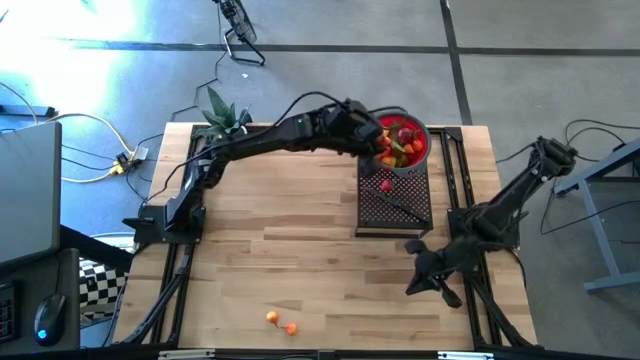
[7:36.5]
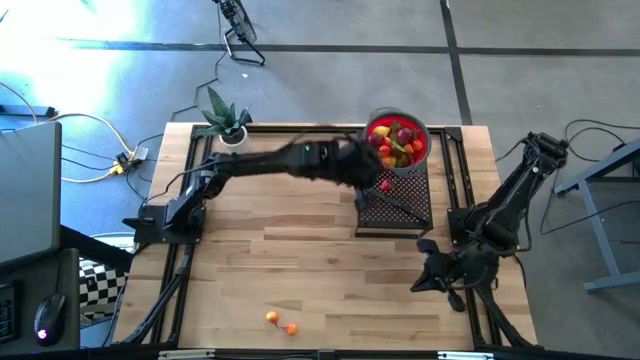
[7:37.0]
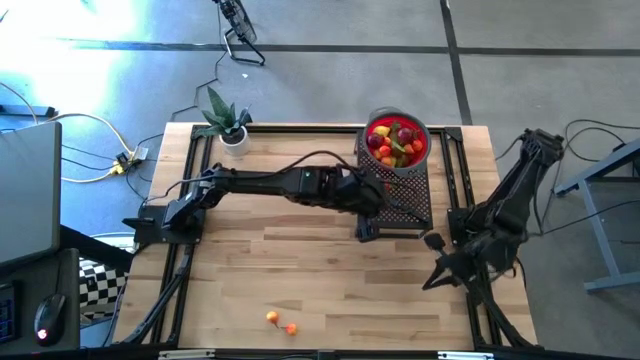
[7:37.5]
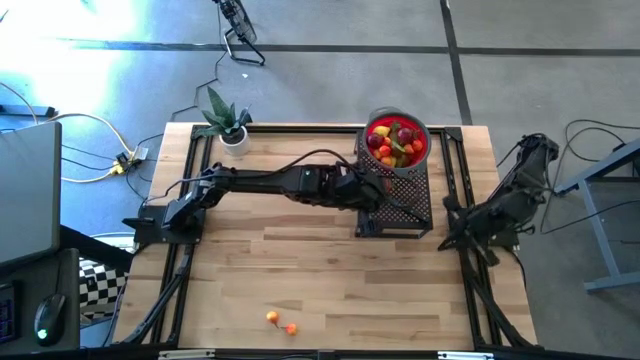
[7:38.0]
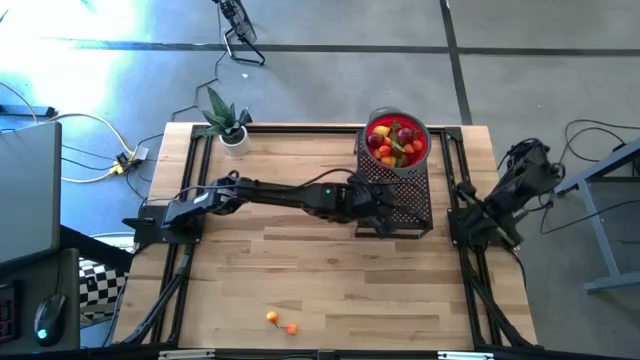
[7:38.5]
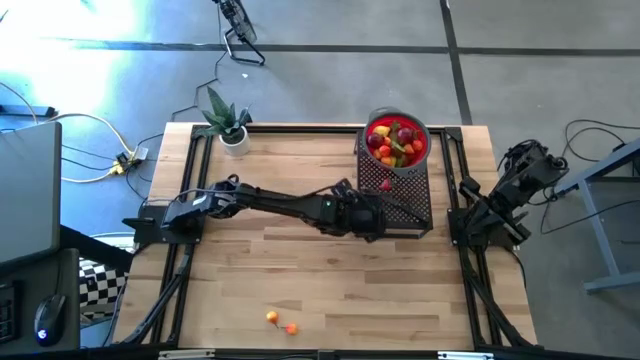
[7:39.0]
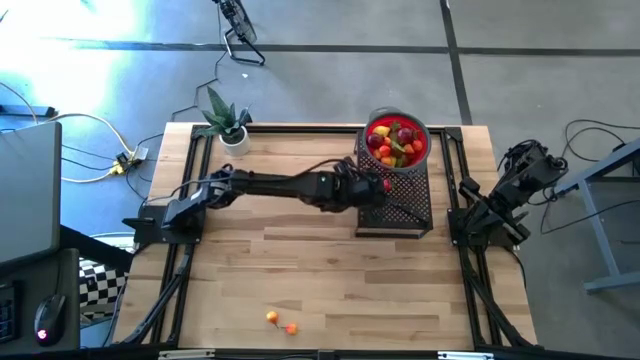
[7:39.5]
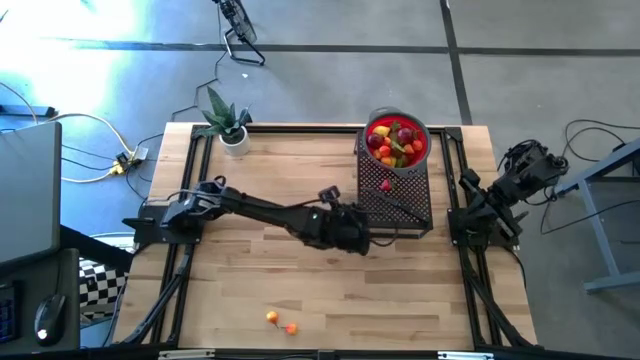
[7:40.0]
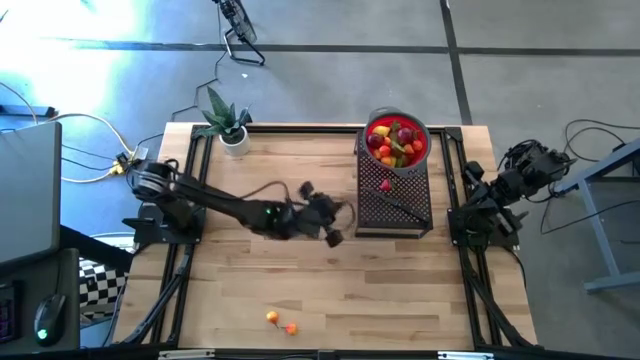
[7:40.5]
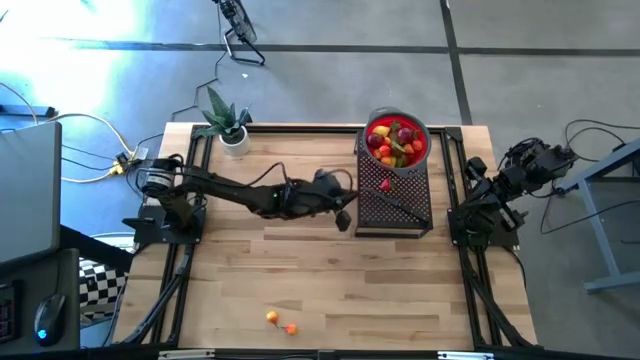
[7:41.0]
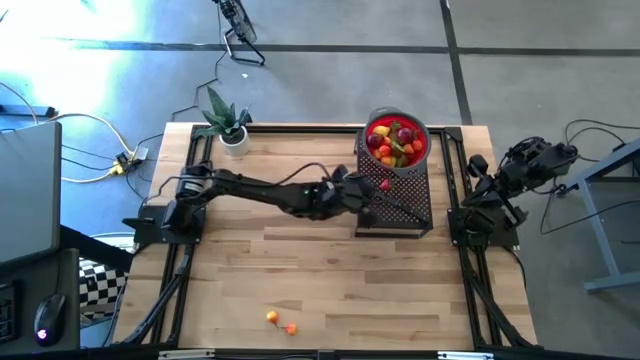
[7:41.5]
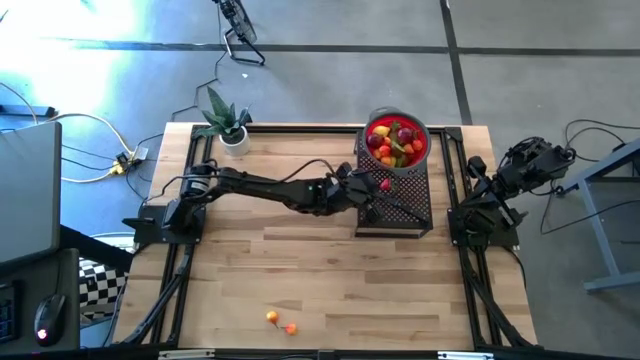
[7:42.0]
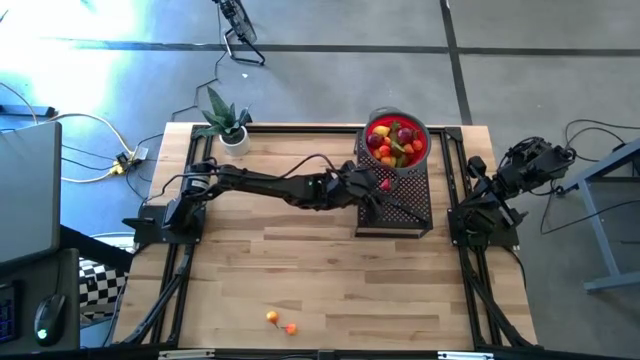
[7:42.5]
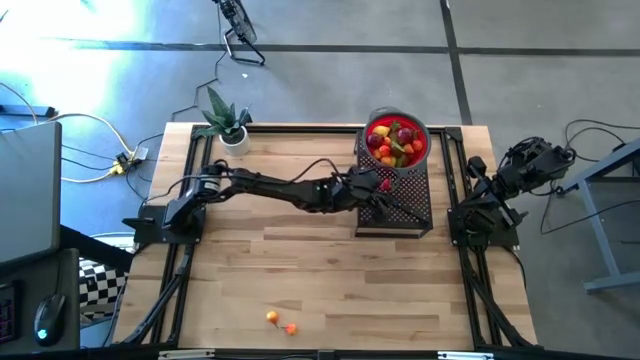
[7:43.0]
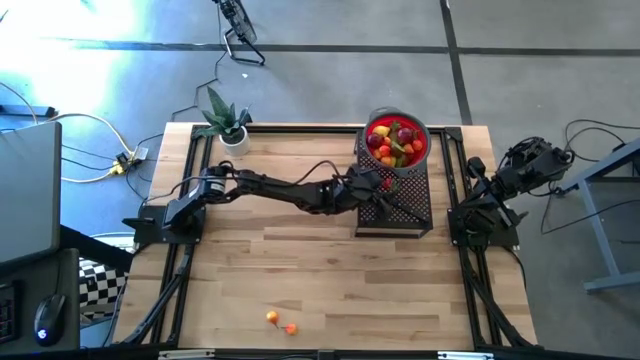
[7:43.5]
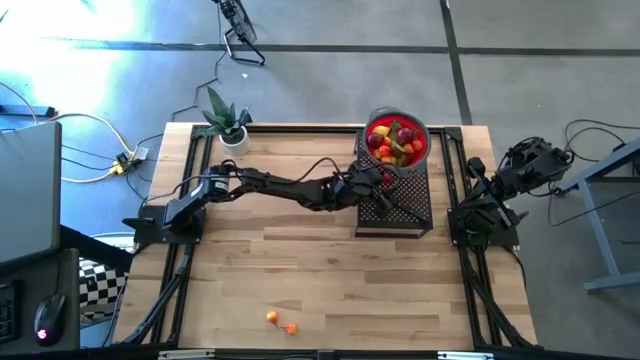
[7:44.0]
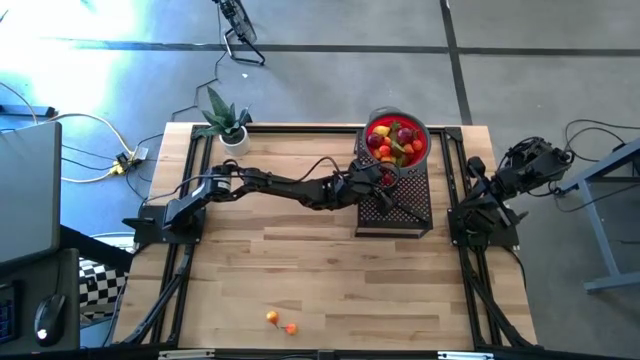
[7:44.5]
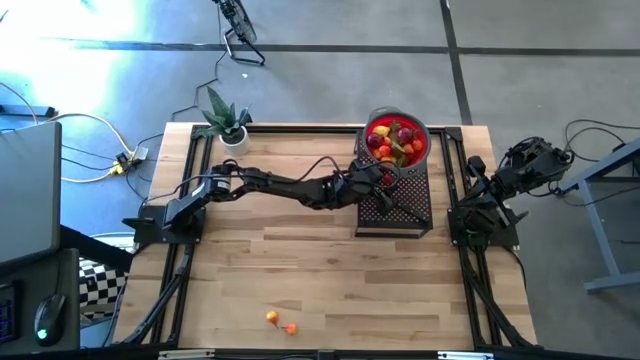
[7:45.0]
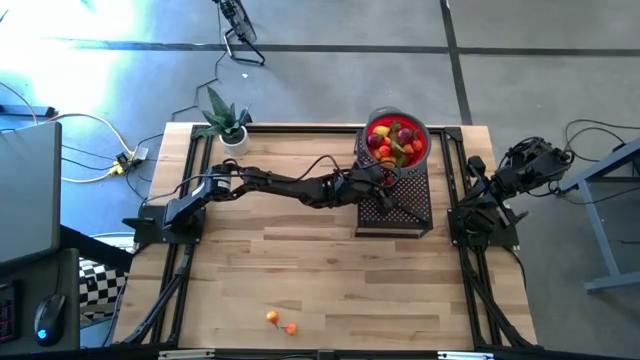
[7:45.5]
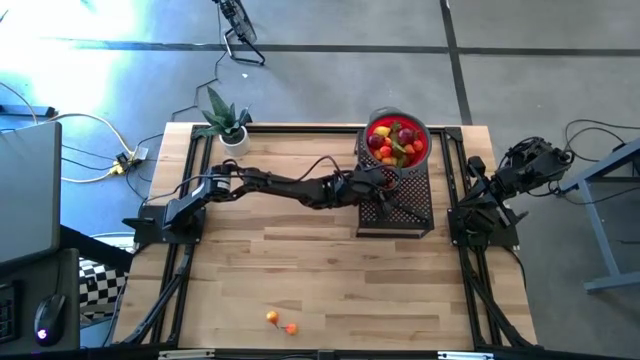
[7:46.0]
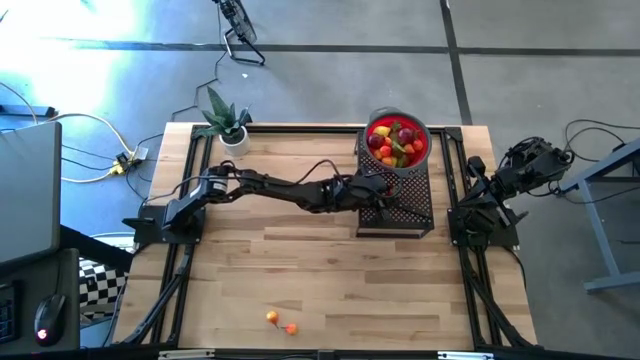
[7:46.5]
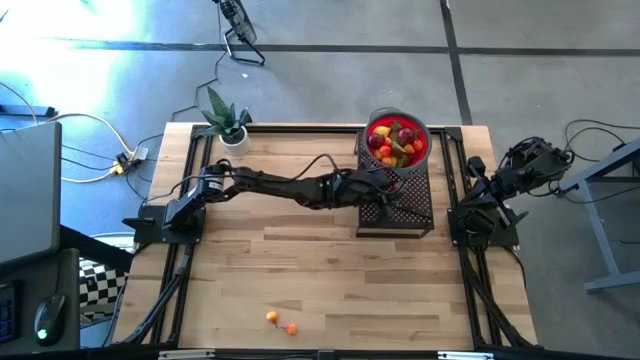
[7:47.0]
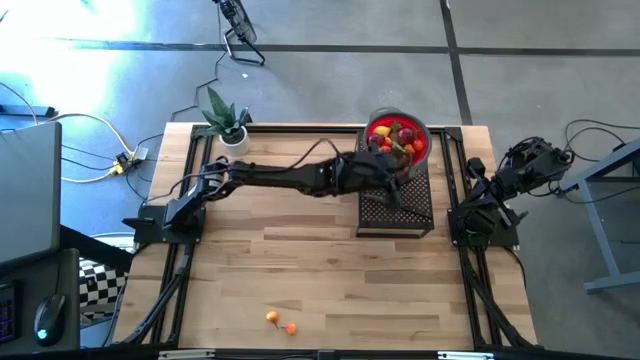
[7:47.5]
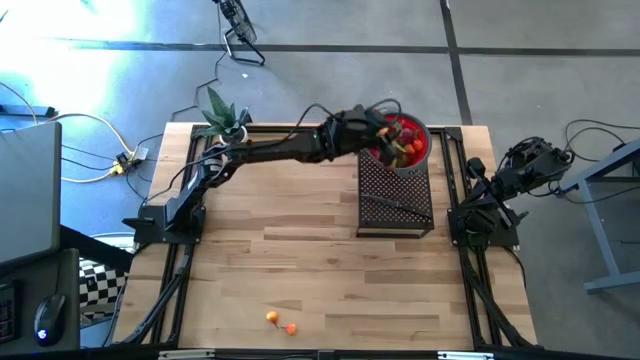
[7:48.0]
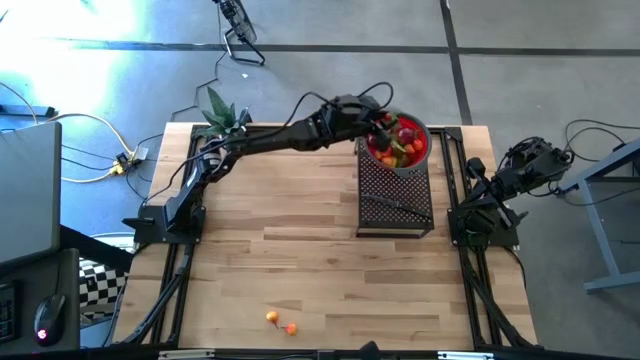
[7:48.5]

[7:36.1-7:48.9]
Task: Pick & Place Fruit
Put the strawberry into the strainer bowl on the shelf

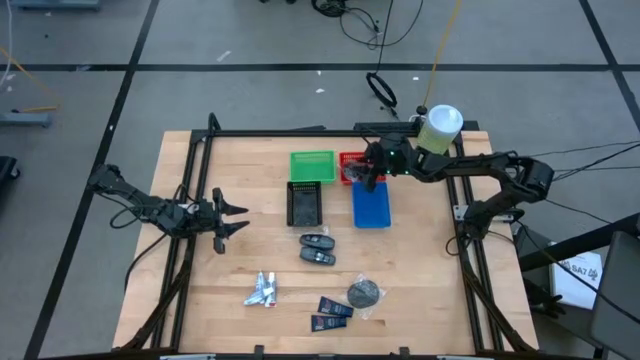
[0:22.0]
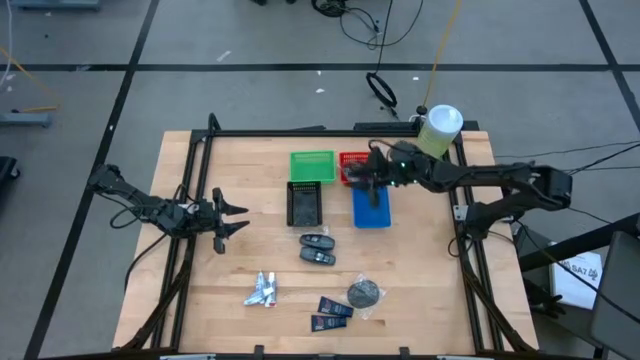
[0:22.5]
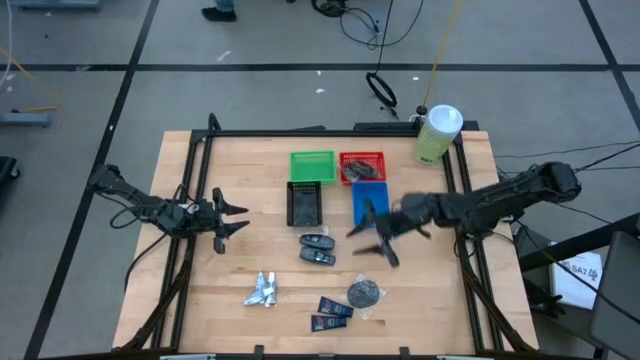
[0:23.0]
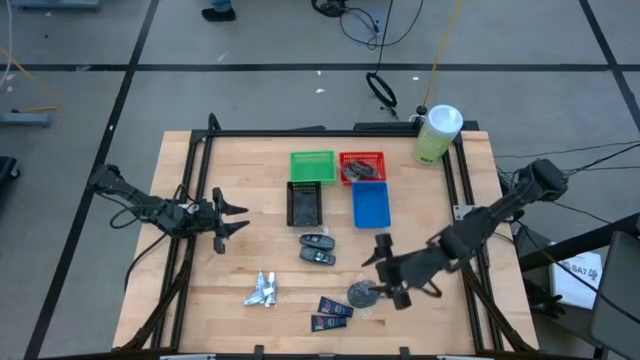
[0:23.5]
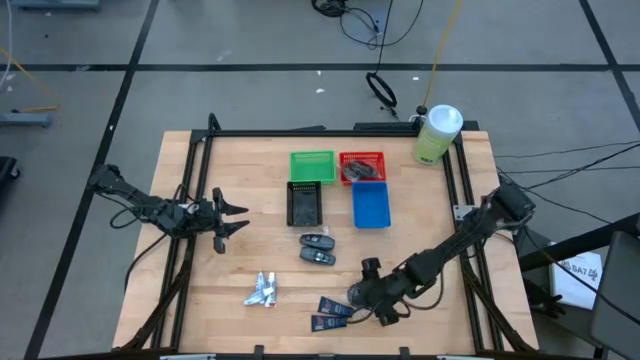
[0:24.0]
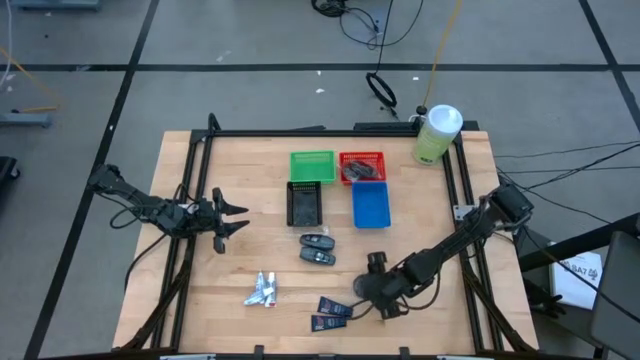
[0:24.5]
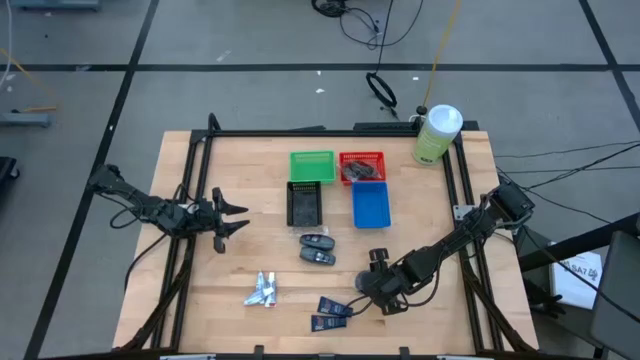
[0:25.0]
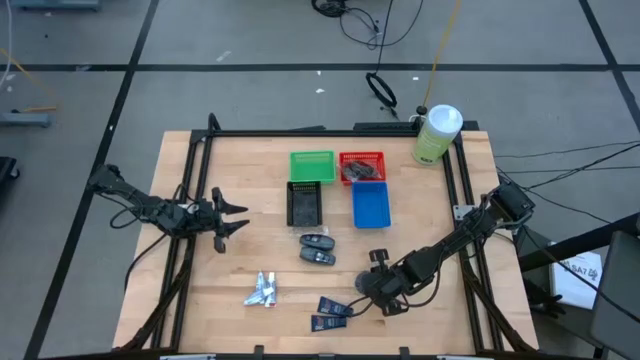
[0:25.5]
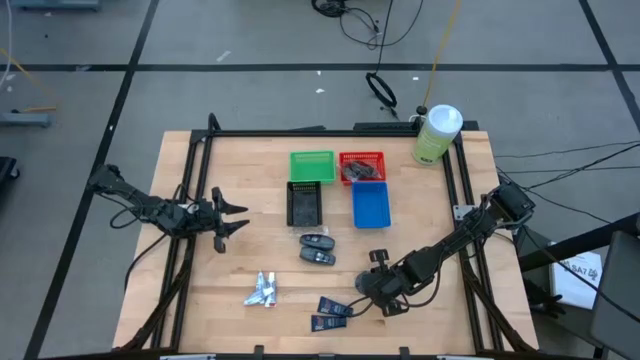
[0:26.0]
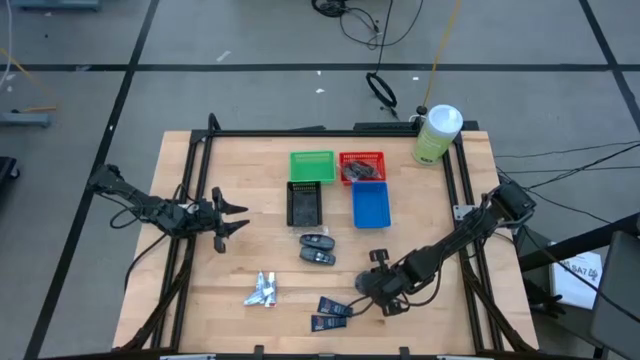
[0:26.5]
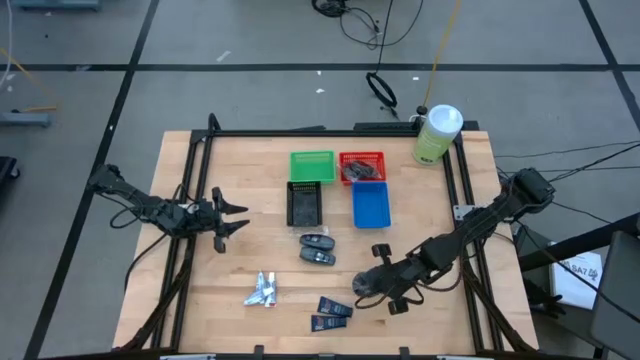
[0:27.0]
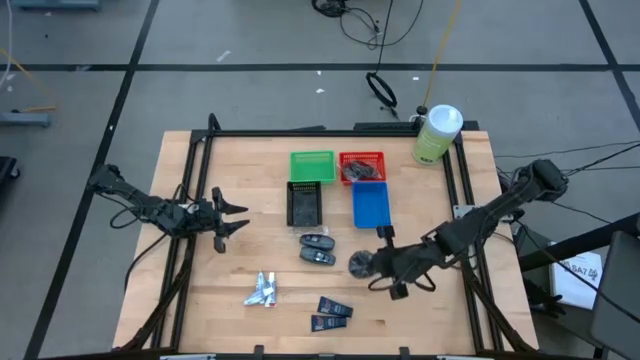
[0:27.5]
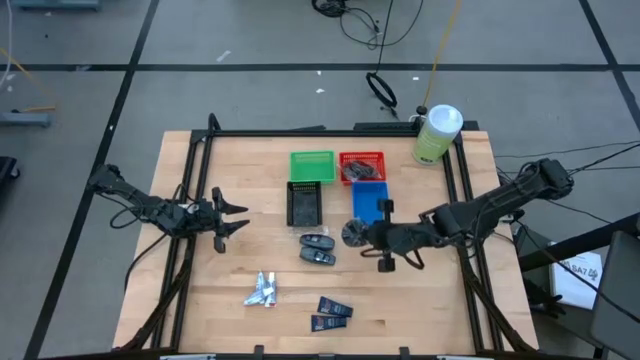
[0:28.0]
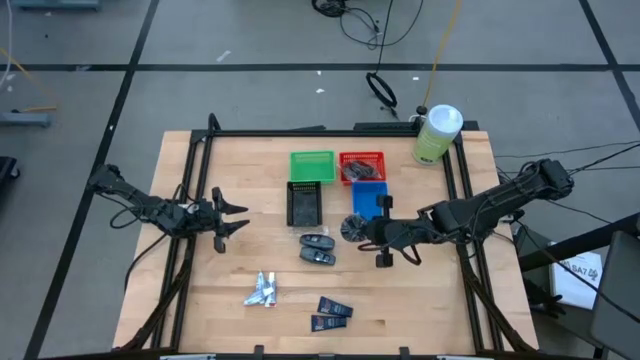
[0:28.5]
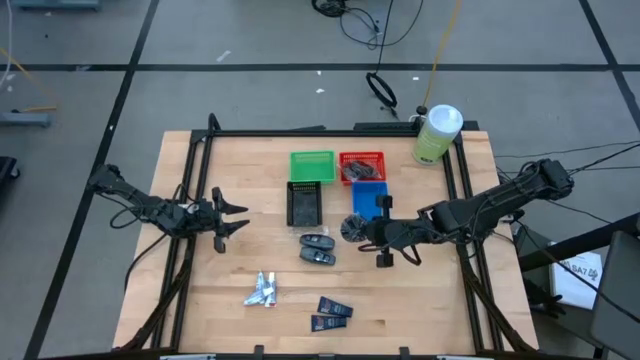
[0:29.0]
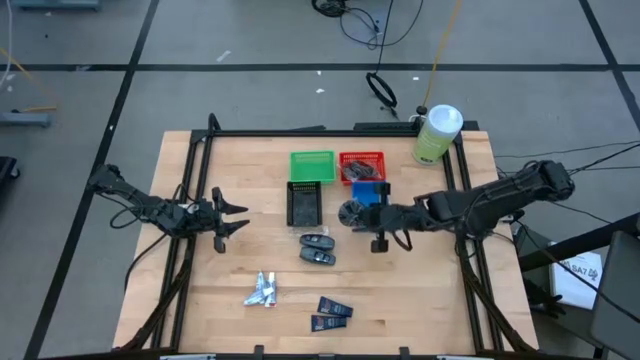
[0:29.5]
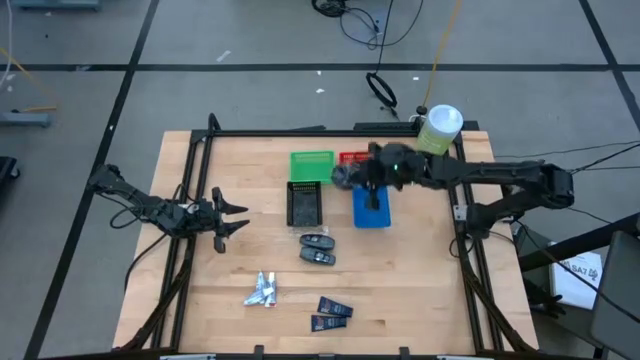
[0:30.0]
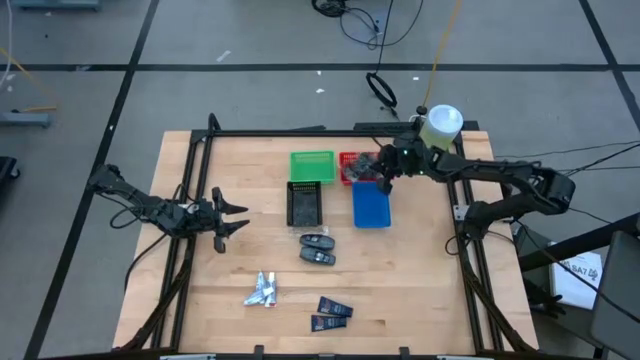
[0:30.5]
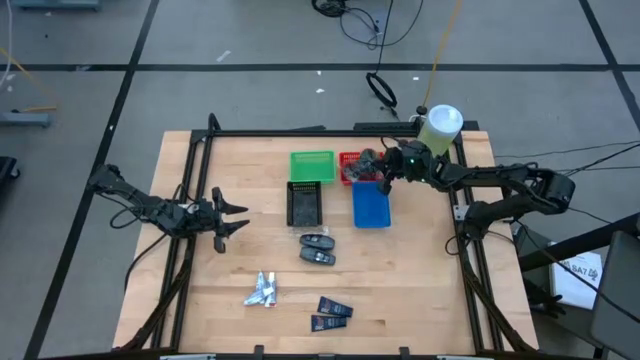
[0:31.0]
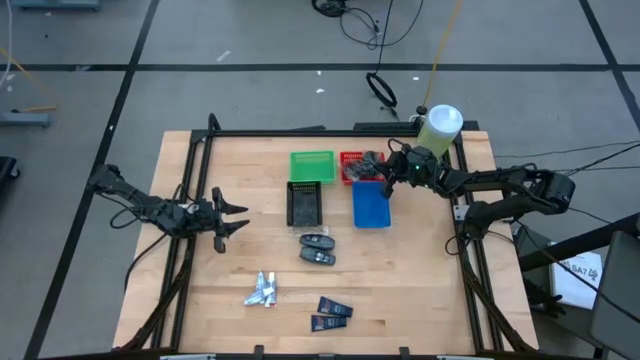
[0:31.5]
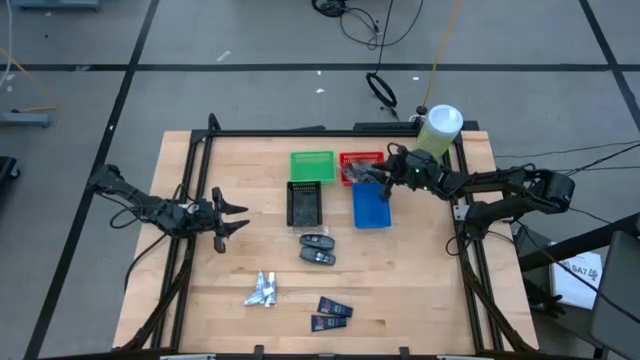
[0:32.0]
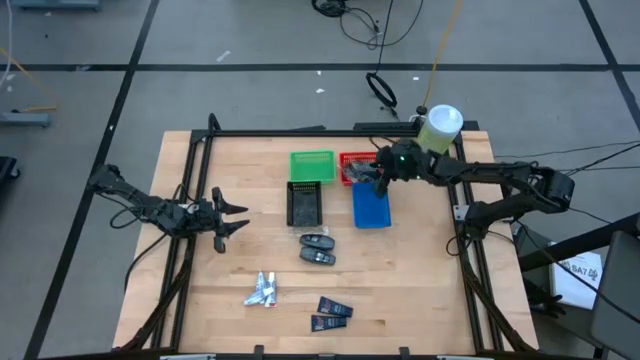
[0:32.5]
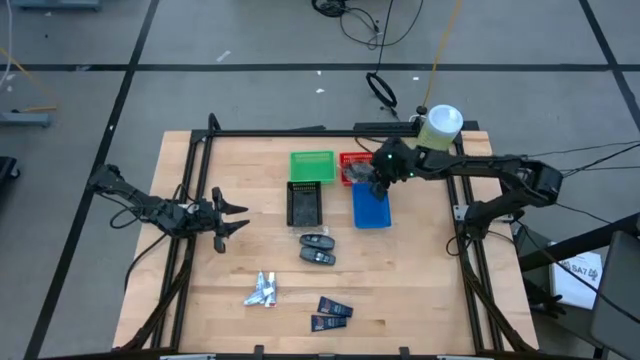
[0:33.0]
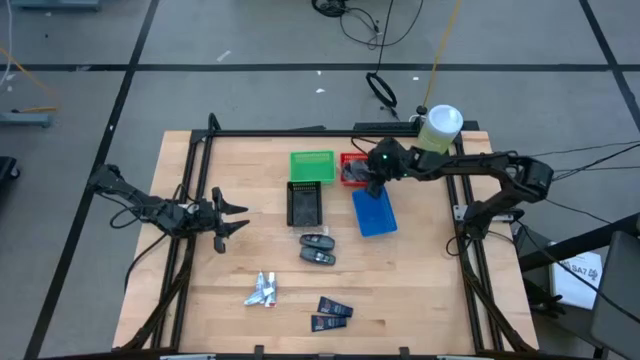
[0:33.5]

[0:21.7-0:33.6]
Task: Pick & Place Travel size toiletries
Put the black hairbrush into the red bin
